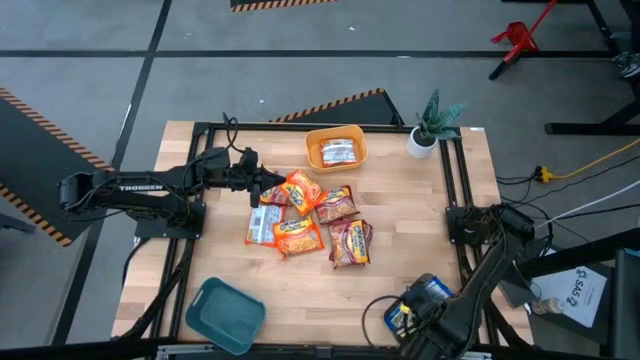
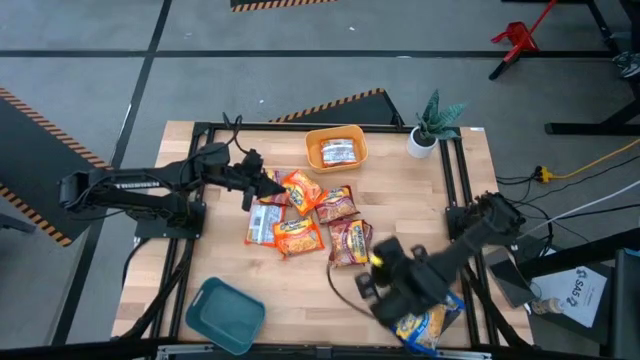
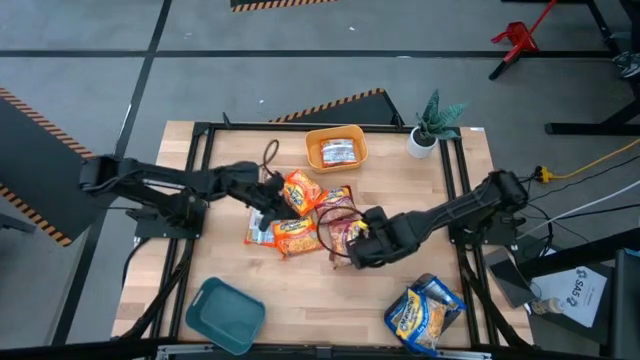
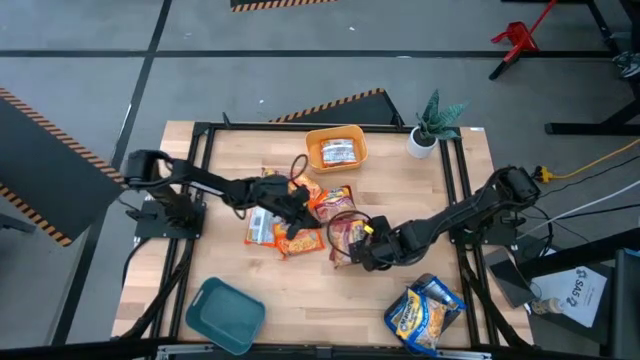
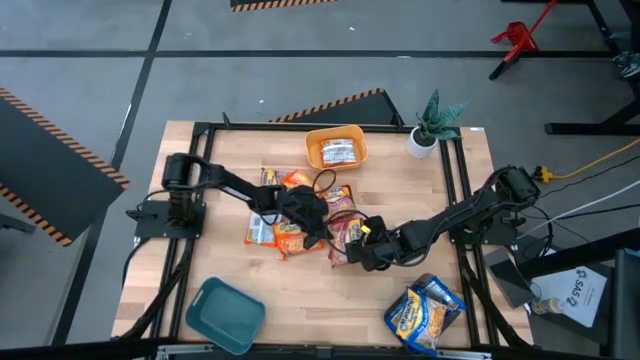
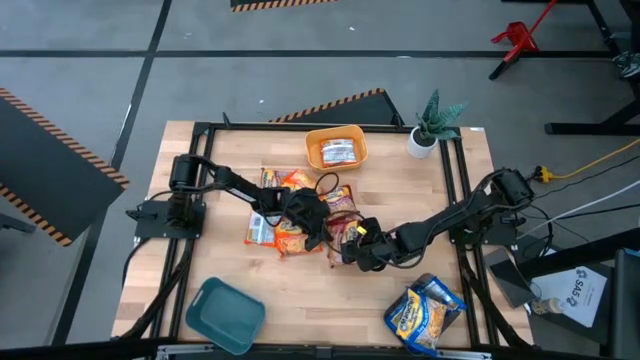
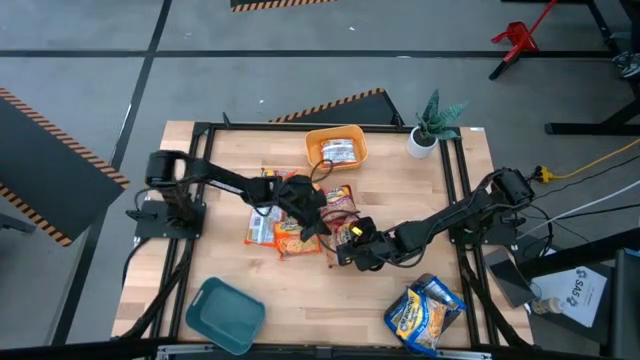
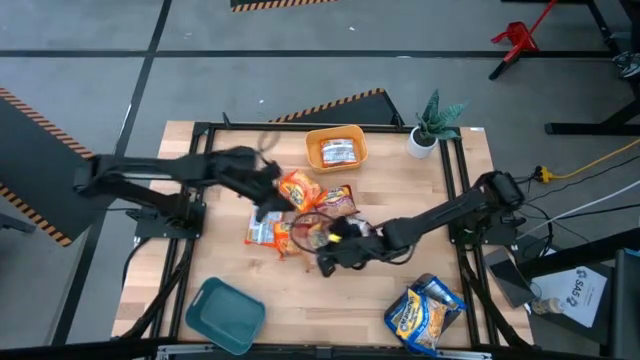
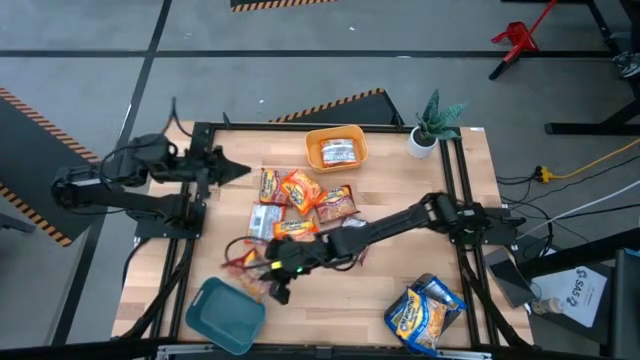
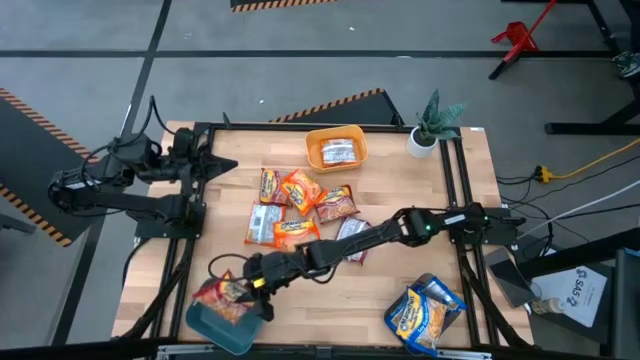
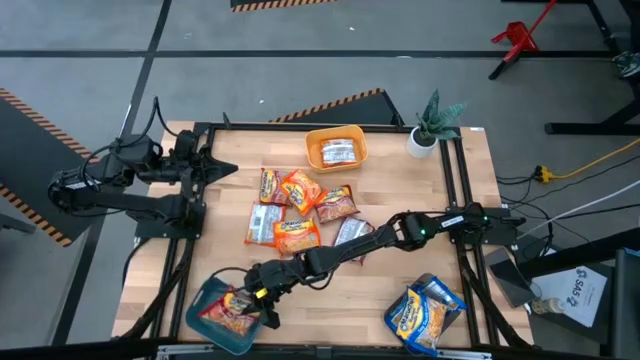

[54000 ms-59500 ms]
Task: Sort Maruchan noodles
Put the red noodle pack into the blue bin

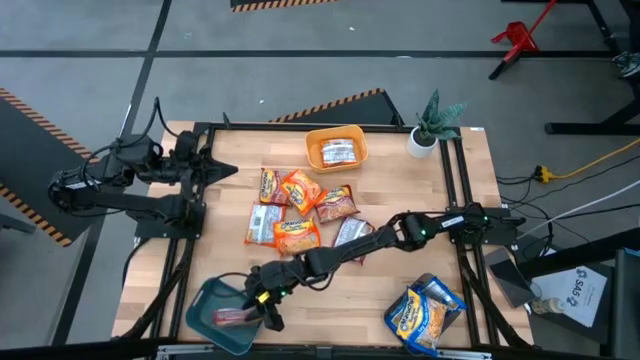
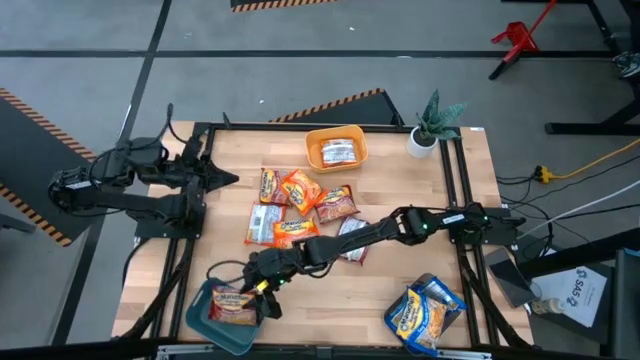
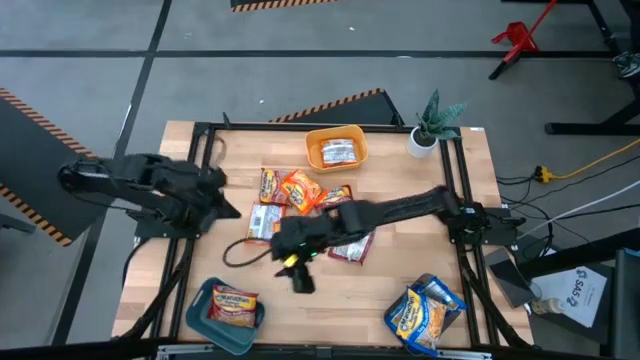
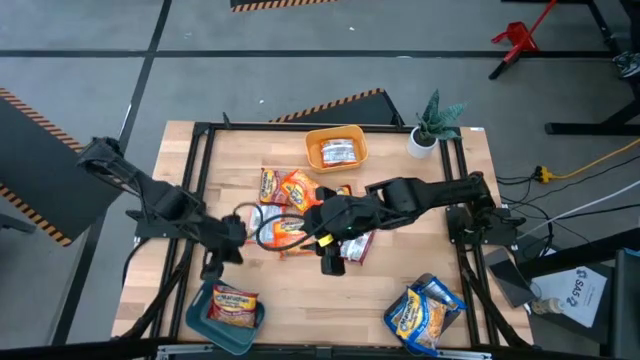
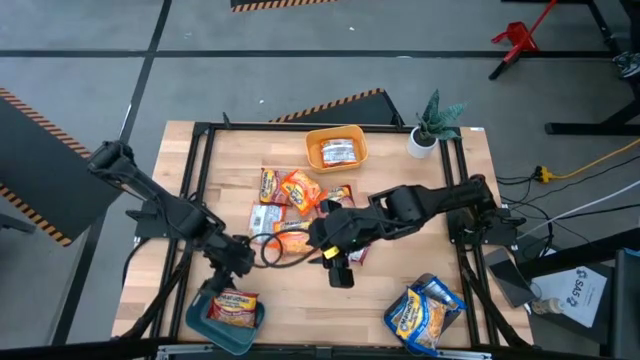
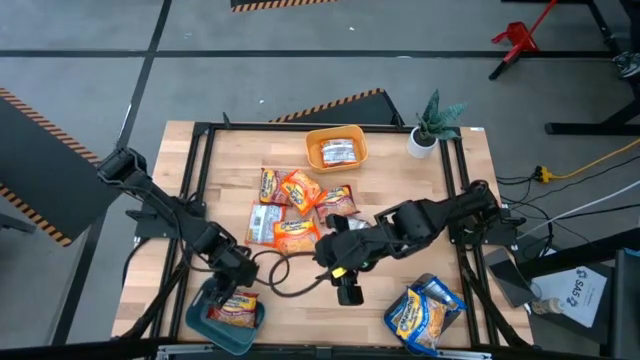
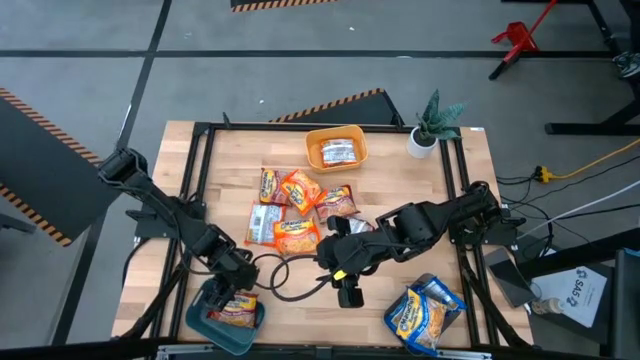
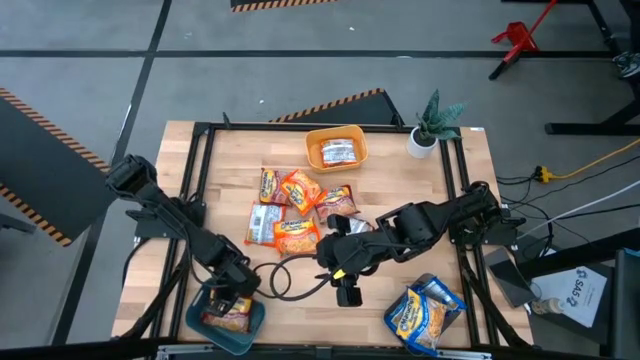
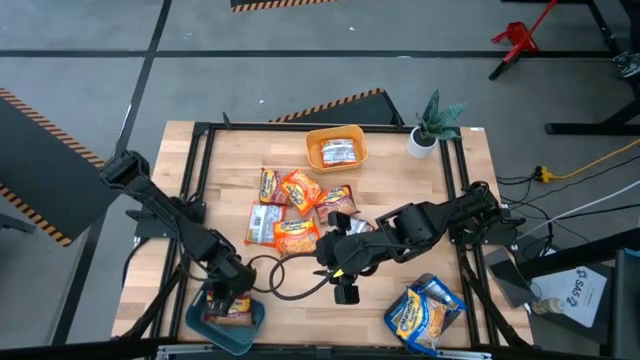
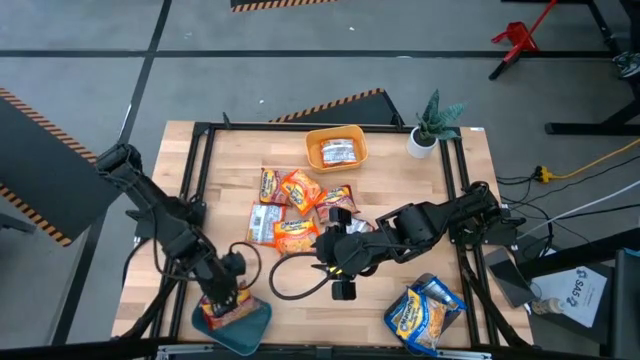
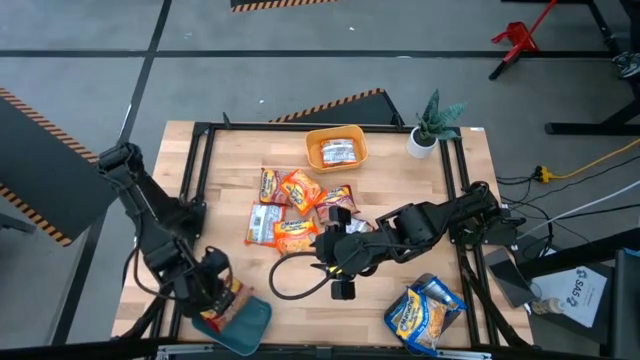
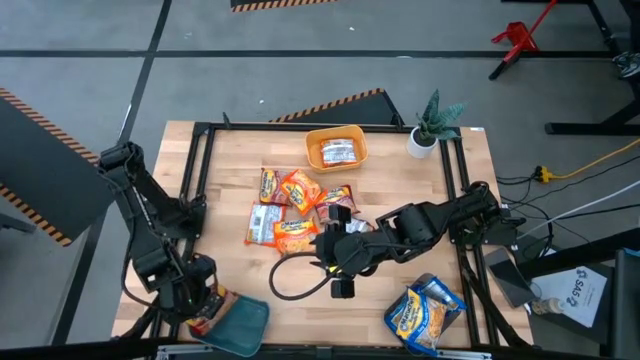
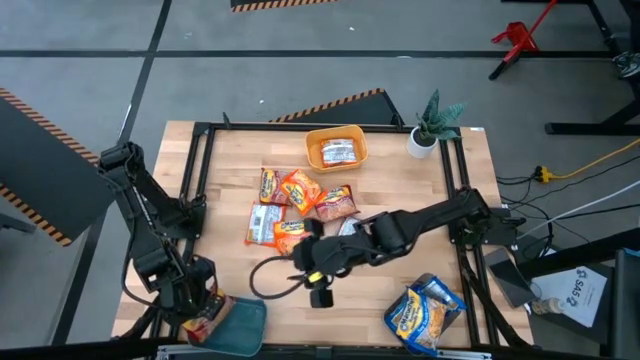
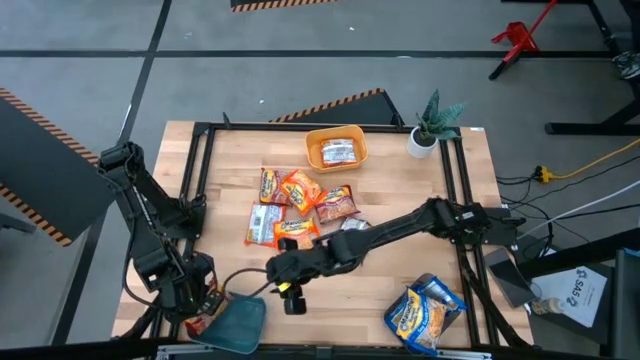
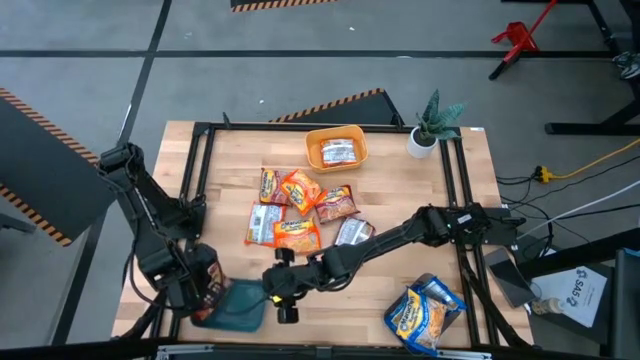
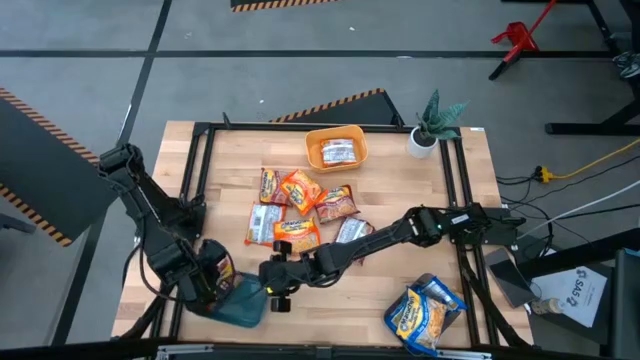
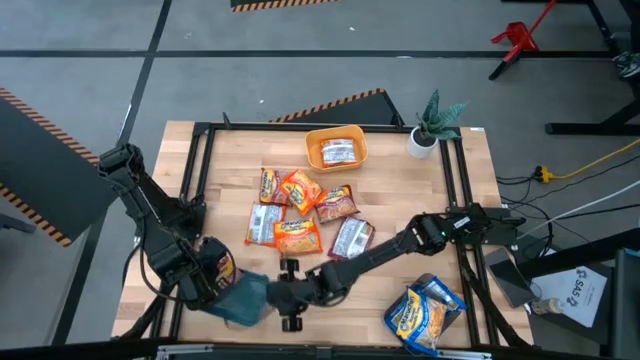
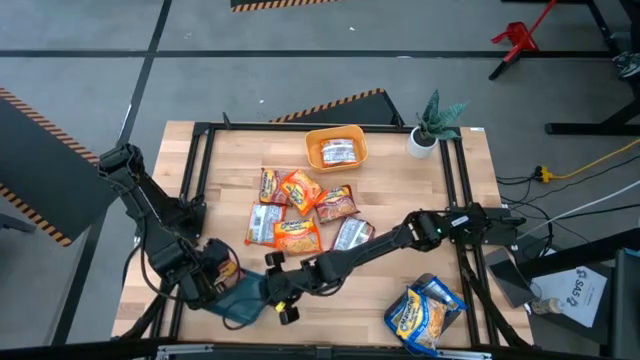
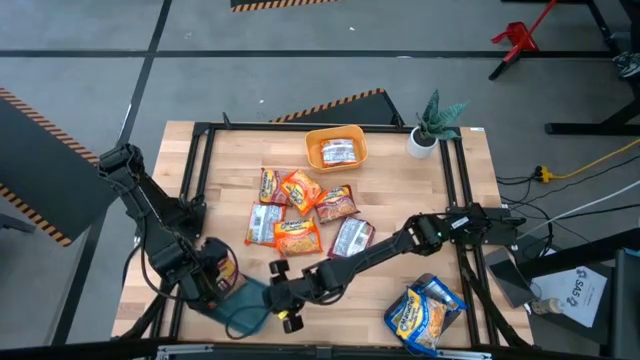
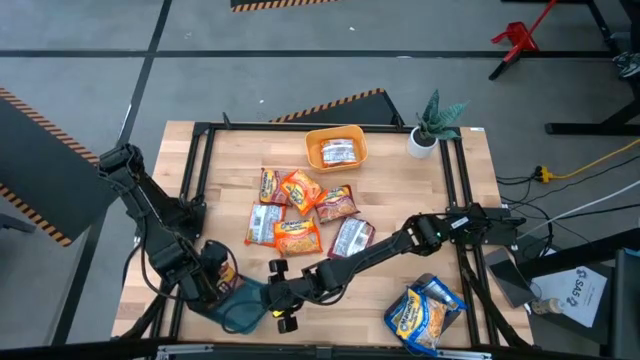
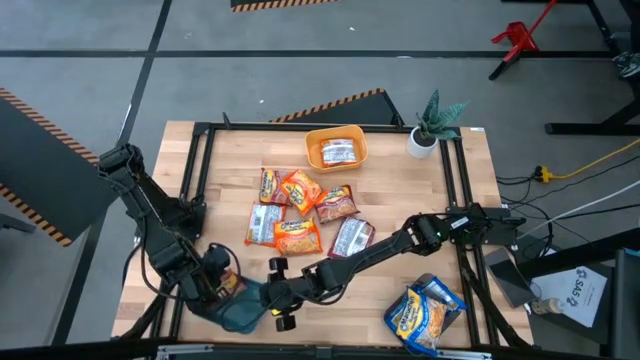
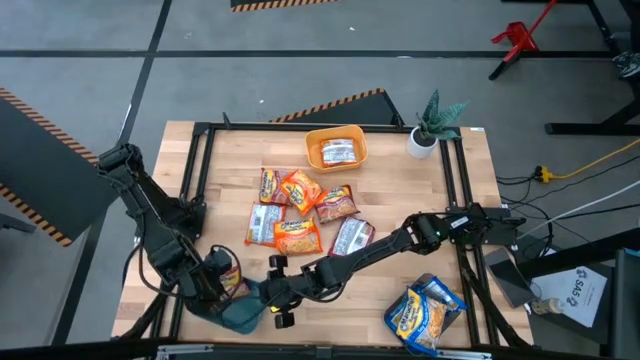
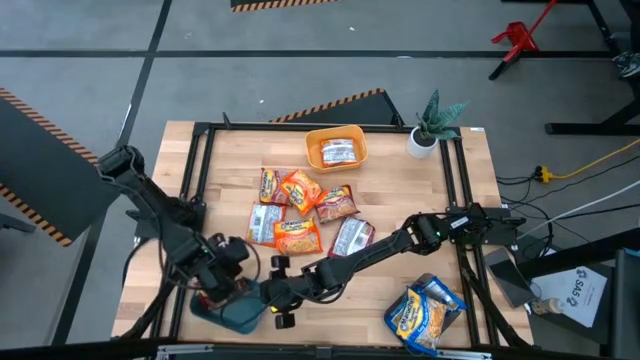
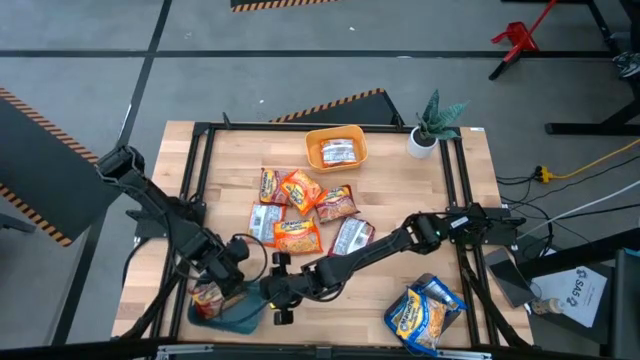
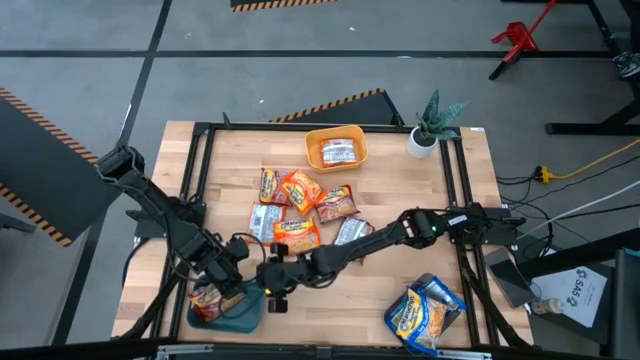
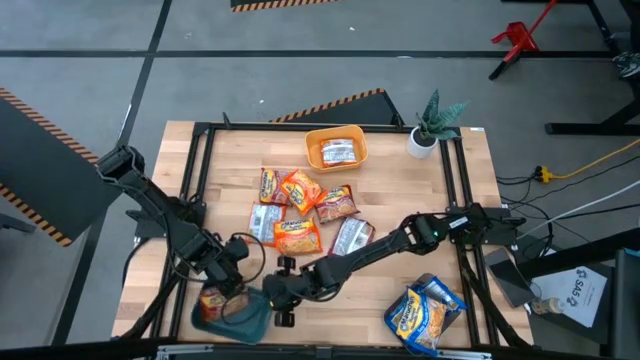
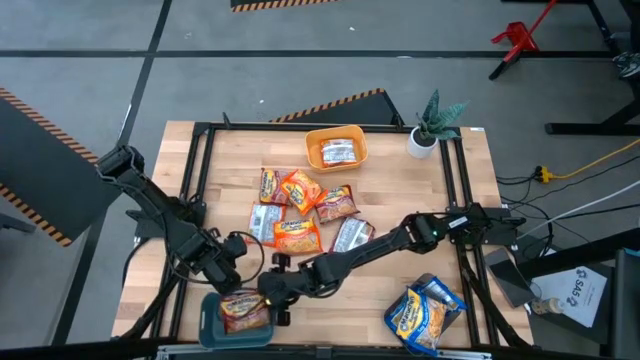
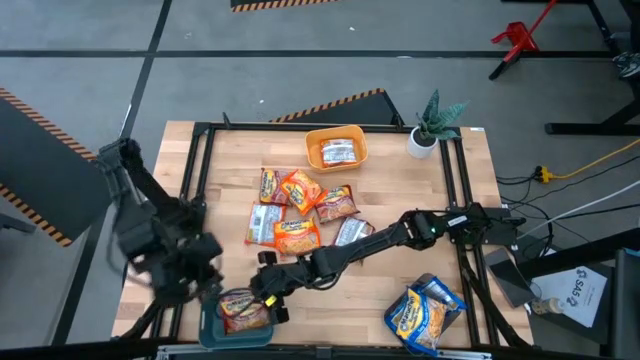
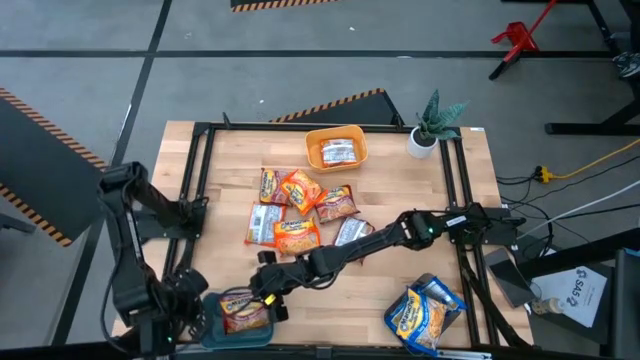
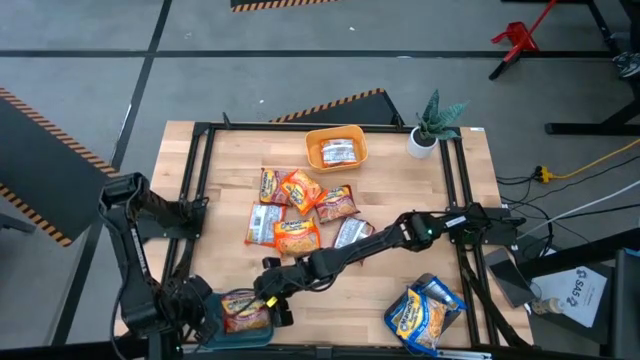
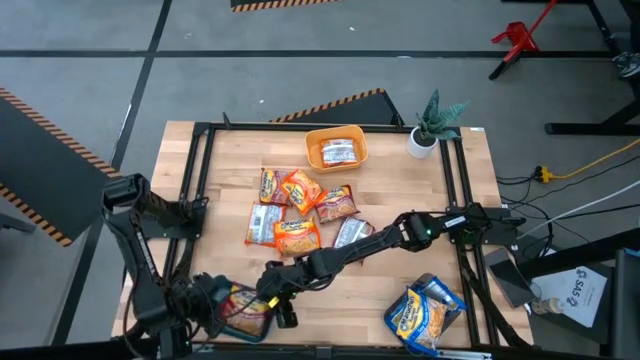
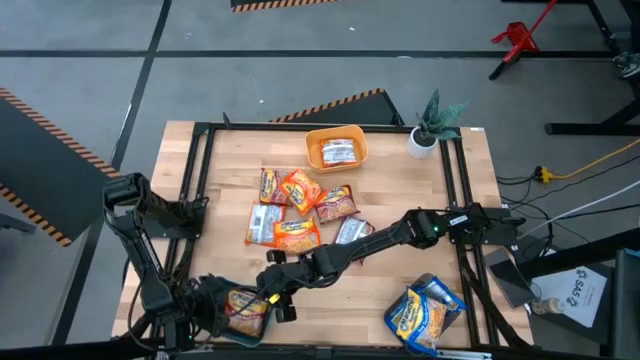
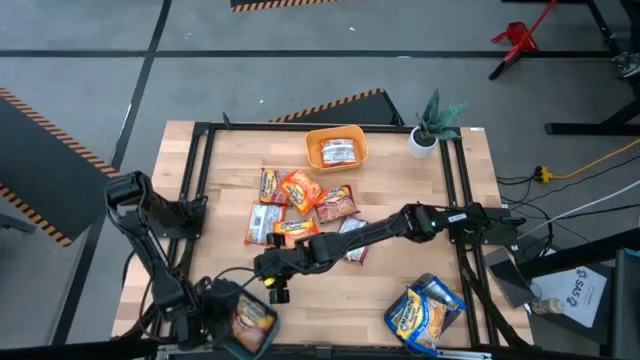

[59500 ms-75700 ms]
Put the red noodles into the blue bin
